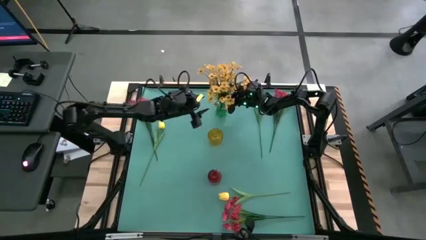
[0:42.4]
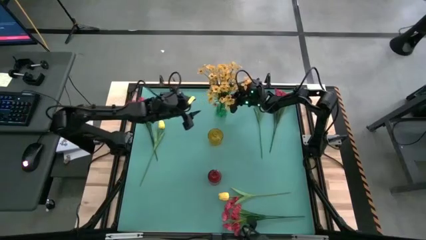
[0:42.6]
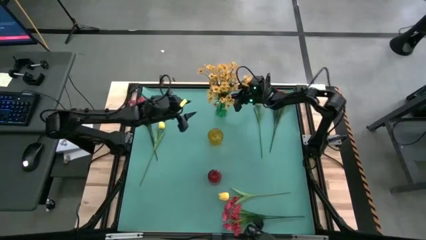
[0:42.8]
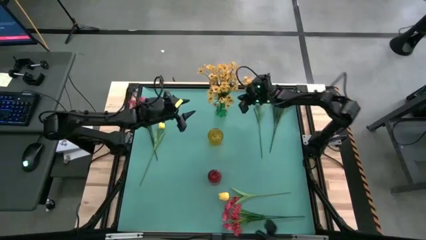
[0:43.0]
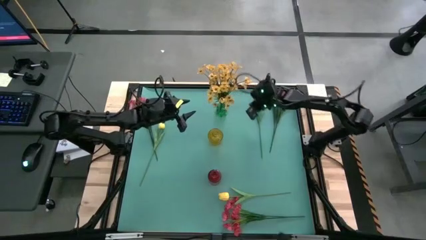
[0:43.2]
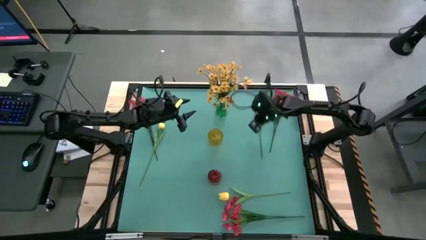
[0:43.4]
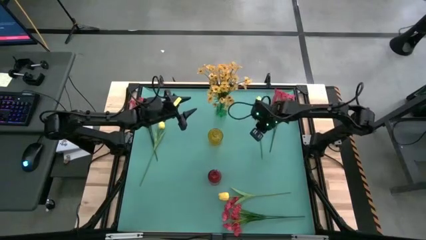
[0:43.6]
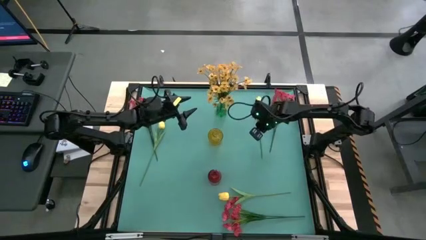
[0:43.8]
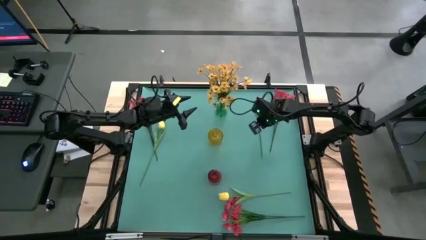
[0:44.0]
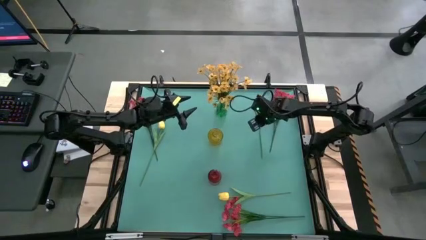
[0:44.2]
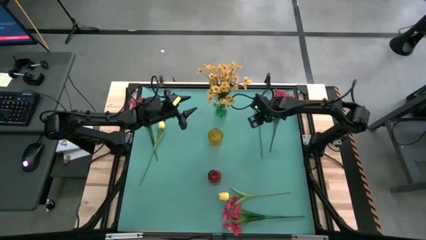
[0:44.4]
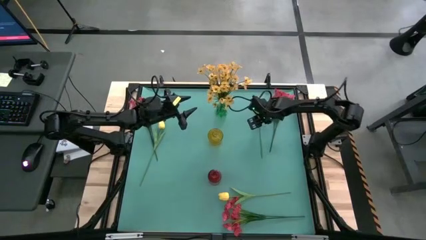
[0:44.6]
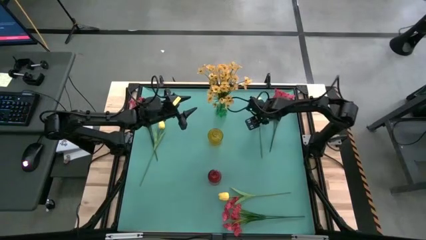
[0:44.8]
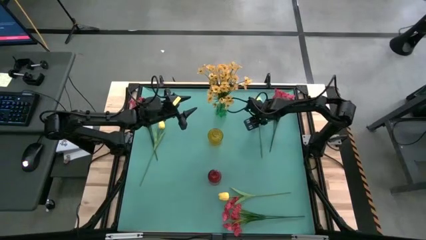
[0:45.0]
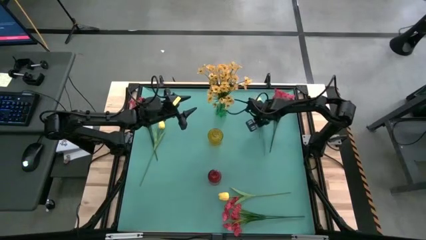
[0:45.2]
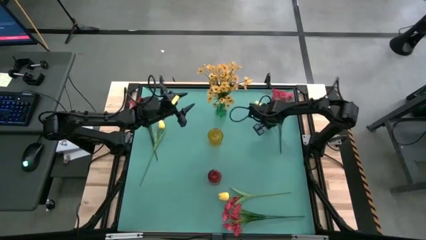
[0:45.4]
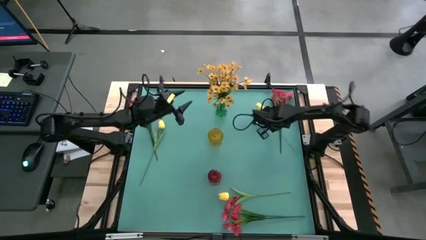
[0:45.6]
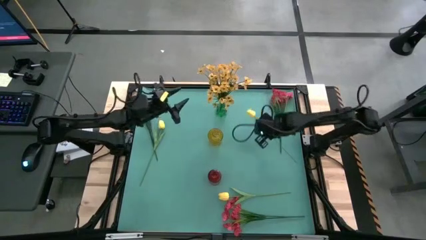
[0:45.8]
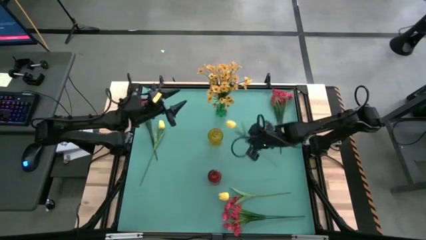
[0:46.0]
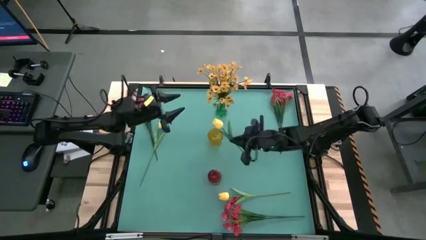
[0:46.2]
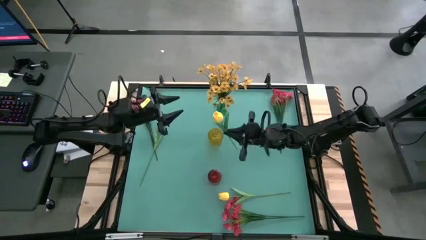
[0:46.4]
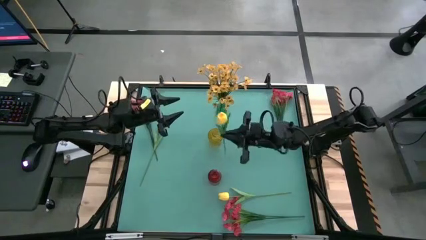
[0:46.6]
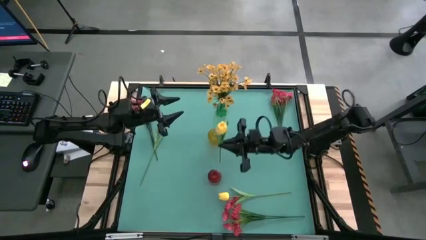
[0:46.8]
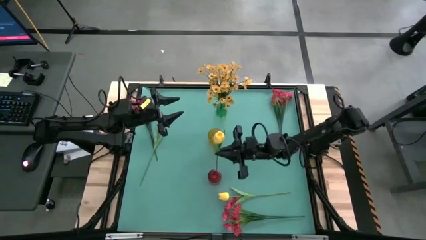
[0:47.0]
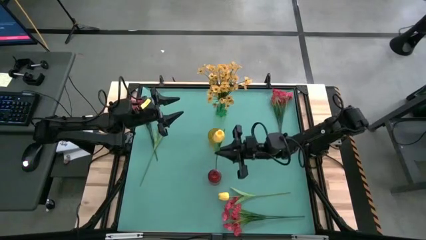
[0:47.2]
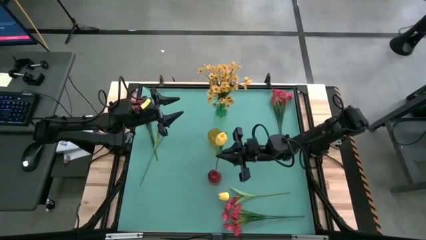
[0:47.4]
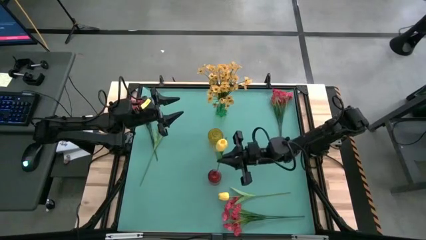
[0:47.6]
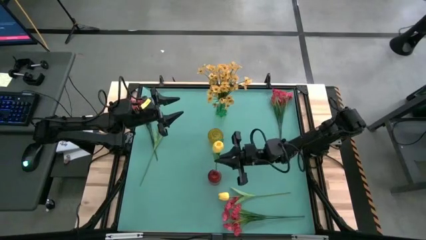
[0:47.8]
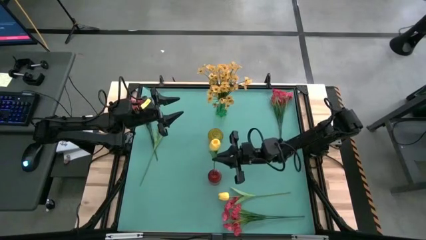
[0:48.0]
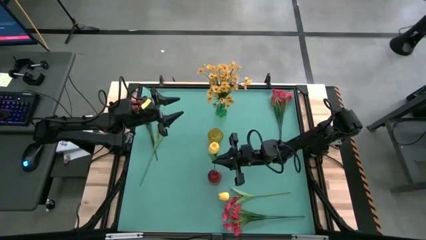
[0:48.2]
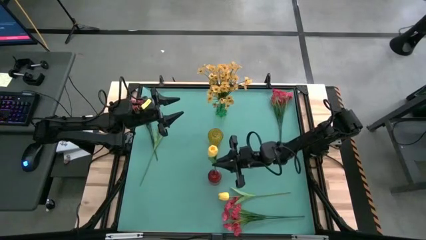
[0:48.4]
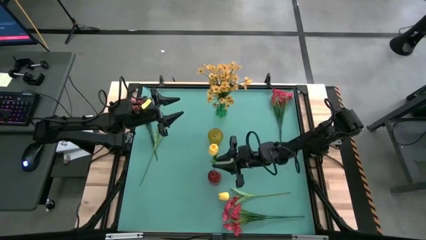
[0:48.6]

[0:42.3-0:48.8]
Task: Sort flowers into vase by color
Put the right yellow flower into the red vase

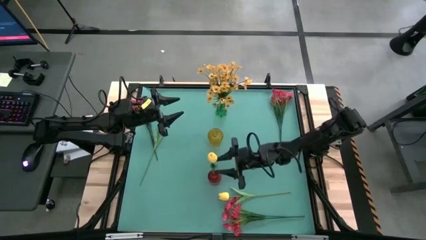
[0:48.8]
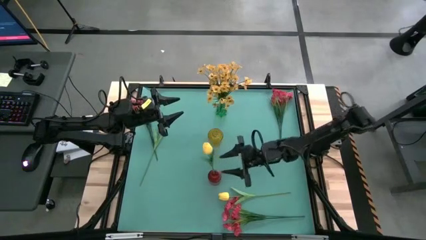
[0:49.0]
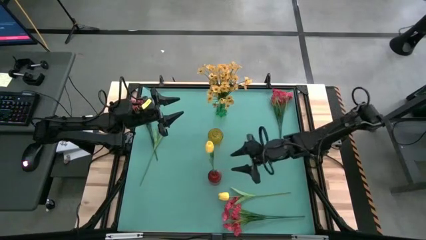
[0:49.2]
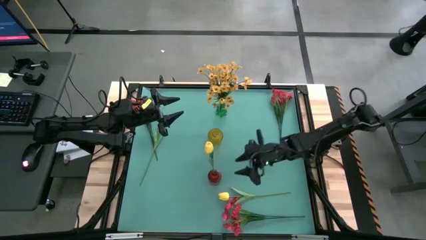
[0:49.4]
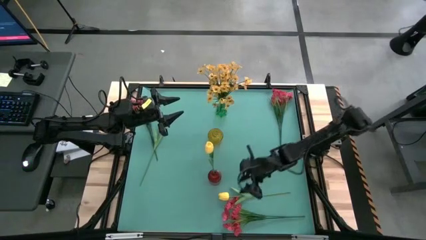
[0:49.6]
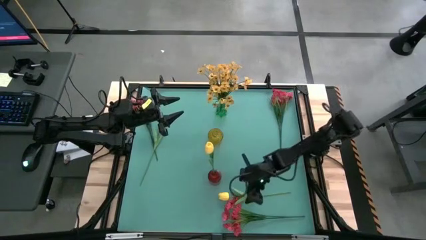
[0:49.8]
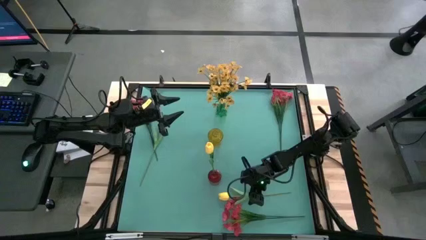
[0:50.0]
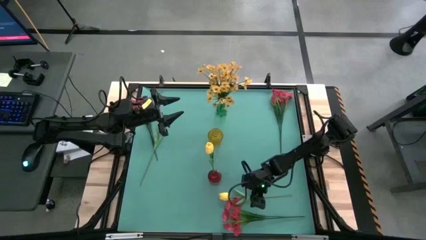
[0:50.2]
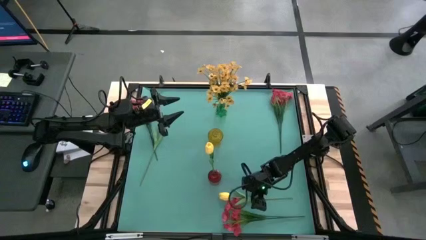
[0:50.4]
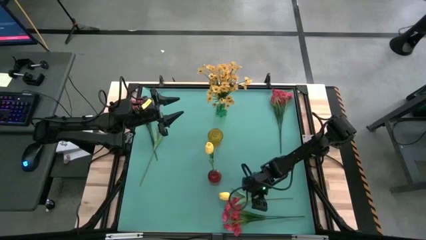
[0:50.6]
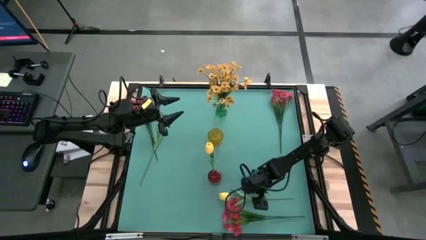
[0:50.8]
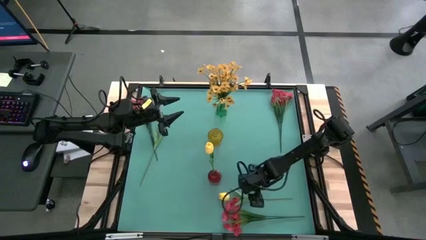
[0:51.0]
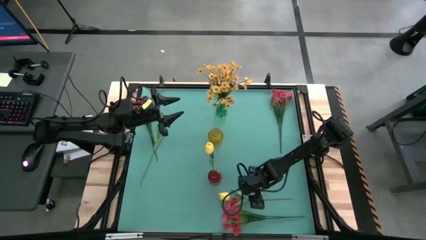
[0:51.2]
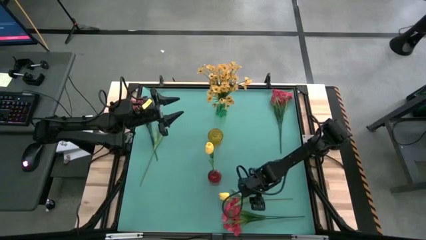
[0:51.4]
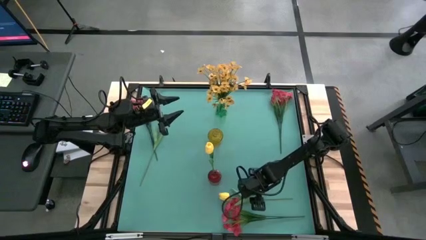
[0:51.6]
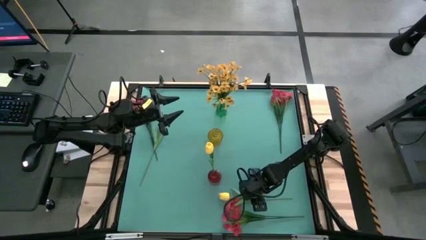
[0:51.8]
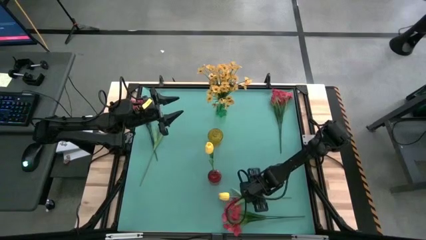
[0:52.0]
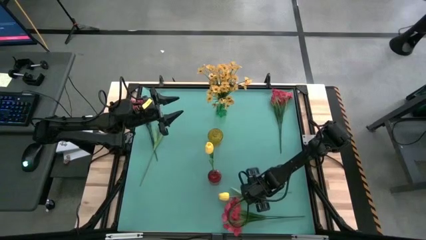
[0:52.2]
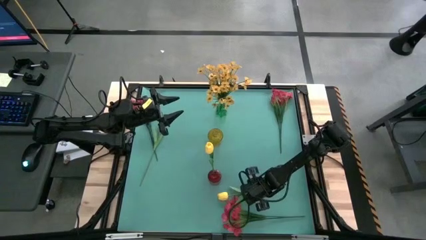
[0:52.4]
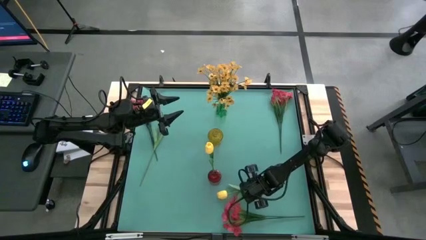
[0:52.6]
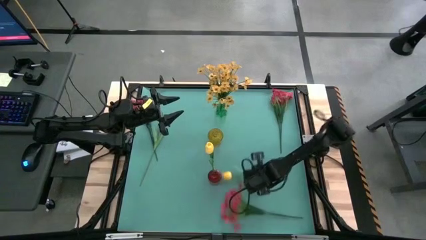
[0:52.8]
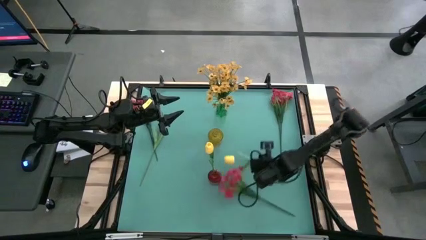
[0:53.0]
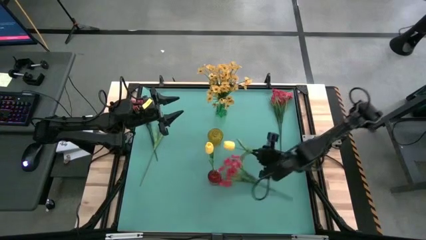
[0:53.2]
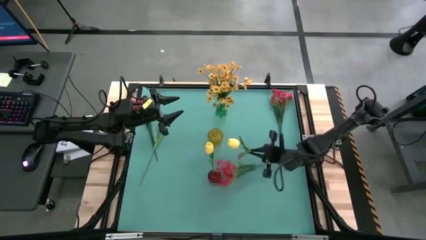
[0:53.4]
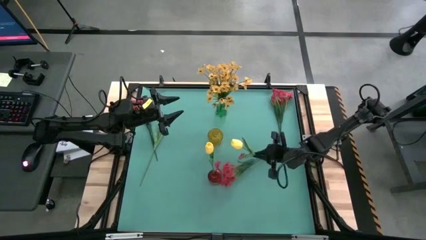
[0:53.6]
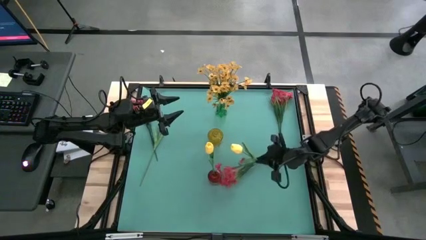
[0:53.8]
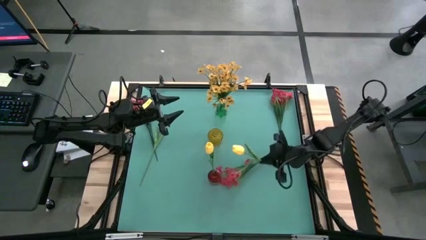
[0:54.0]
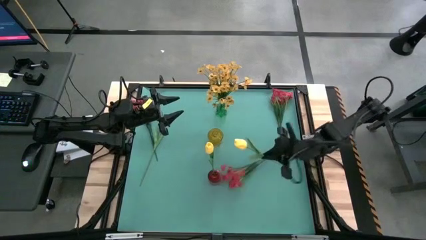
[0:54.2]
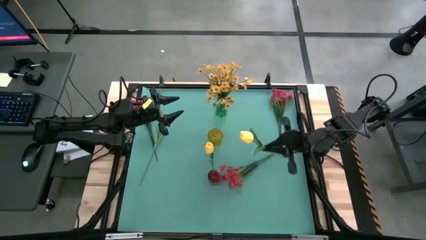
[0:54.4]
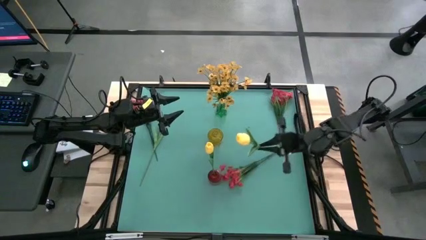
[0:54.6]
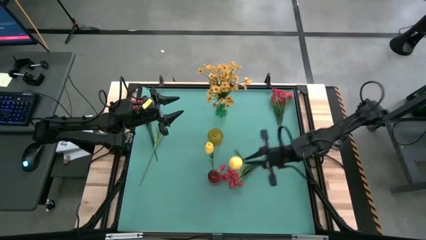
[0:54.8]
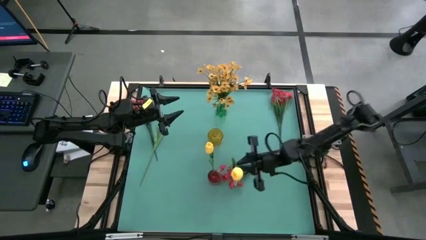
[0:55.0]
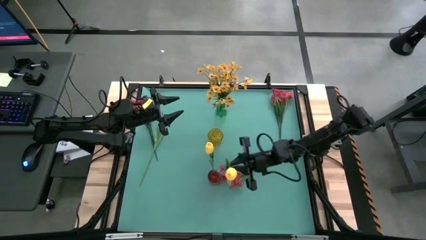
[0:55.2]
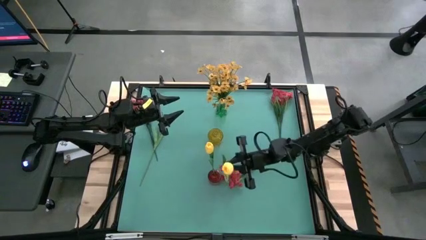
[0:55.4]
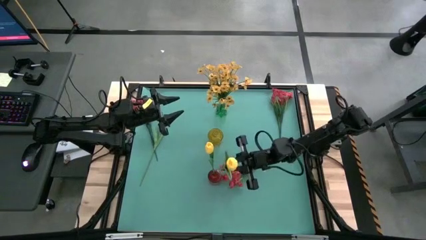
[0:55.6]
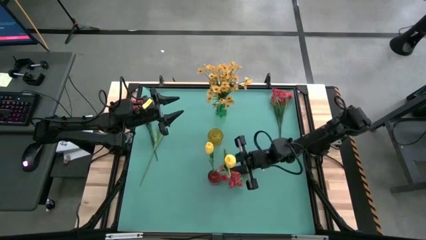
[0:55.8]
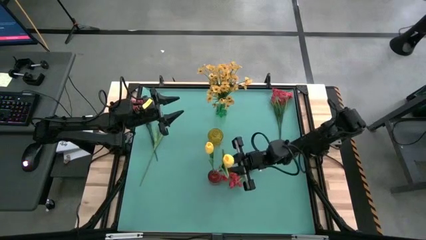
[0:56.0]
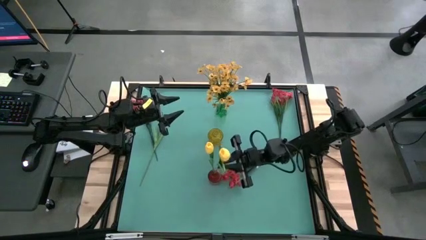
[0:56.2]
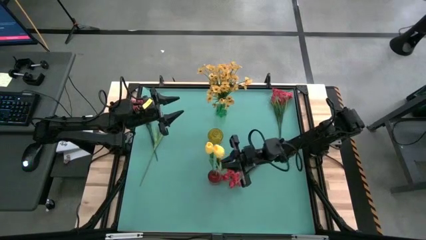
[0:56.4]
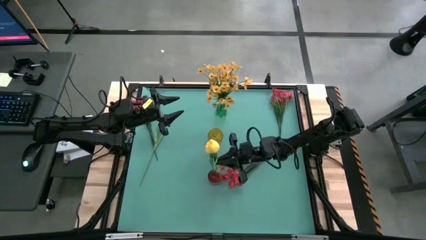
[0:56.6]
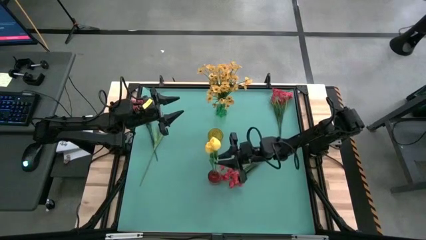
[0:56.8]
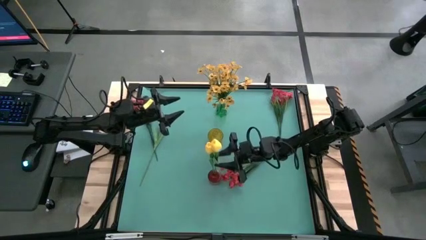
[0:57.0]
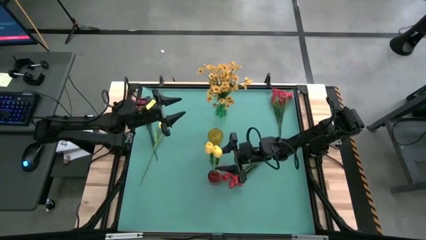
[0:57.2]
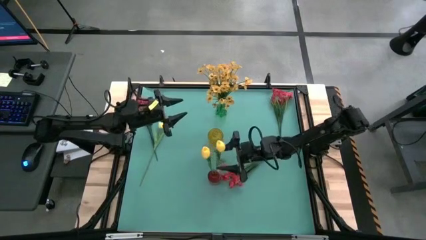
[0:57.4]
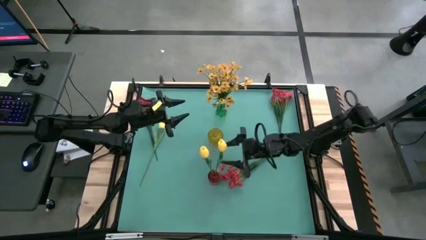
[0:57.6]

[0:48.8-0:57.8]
Put the bottom yellow flower into the red vase
